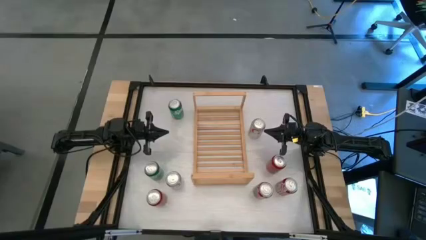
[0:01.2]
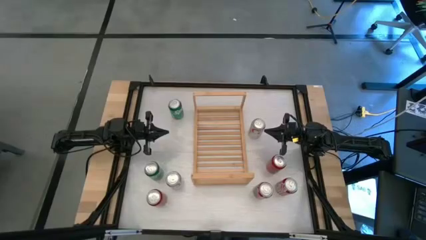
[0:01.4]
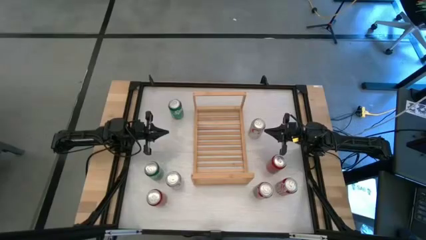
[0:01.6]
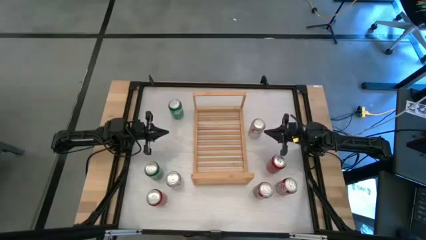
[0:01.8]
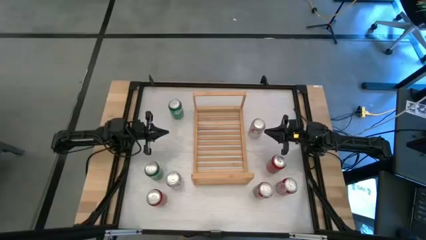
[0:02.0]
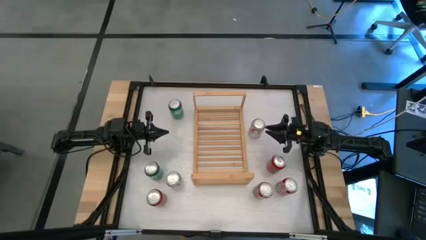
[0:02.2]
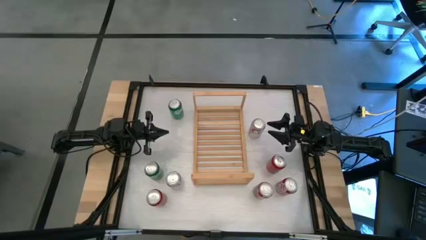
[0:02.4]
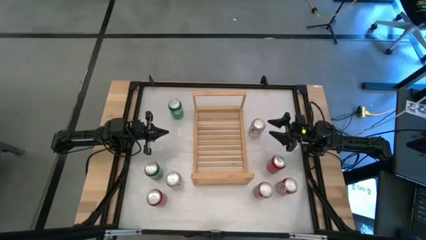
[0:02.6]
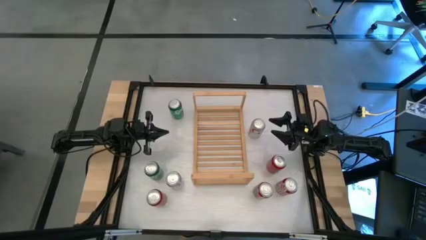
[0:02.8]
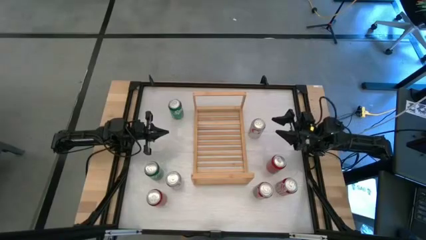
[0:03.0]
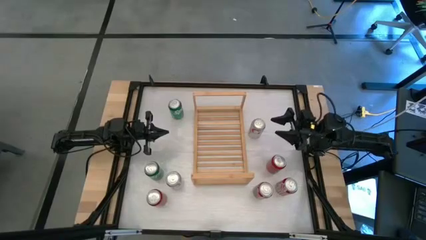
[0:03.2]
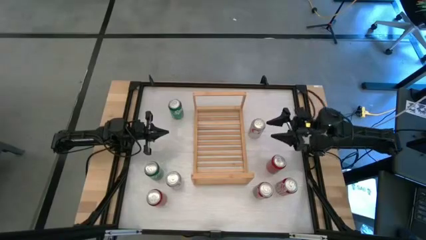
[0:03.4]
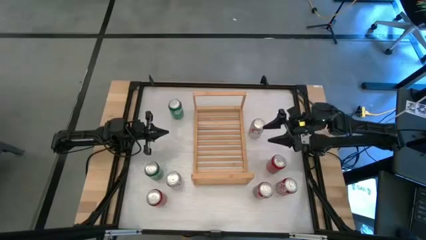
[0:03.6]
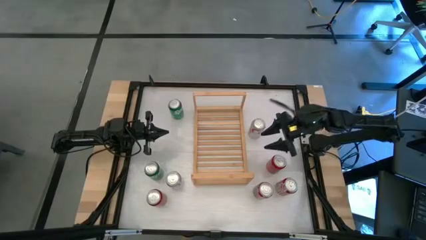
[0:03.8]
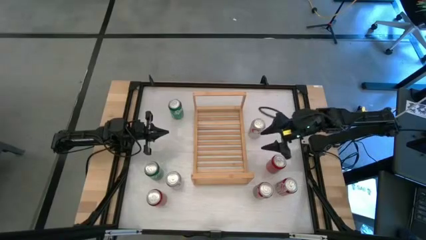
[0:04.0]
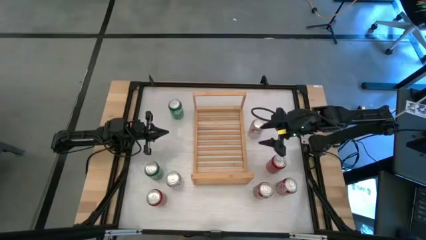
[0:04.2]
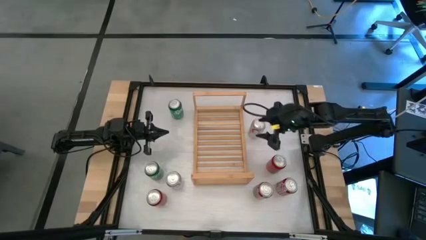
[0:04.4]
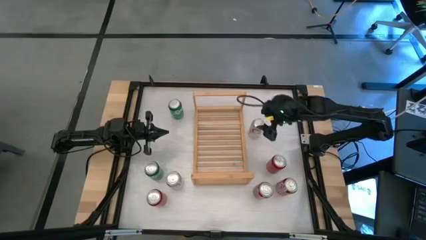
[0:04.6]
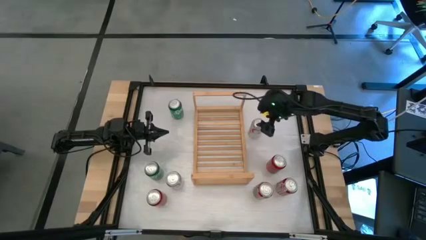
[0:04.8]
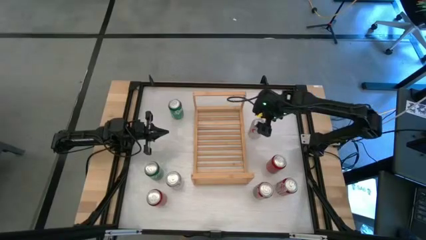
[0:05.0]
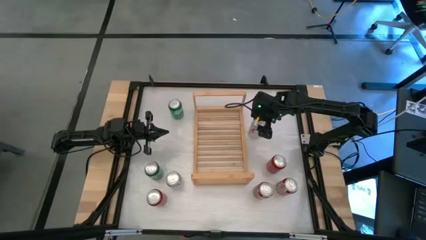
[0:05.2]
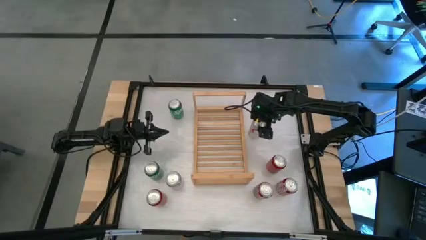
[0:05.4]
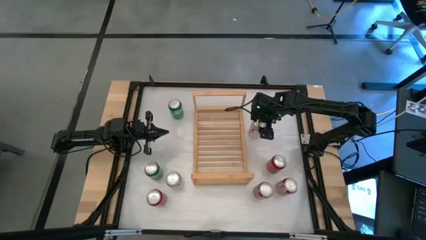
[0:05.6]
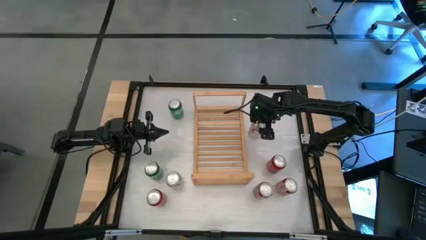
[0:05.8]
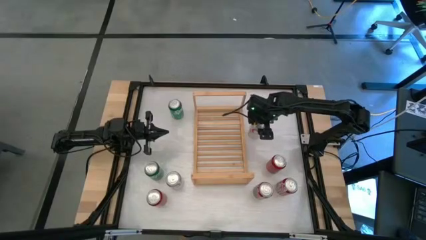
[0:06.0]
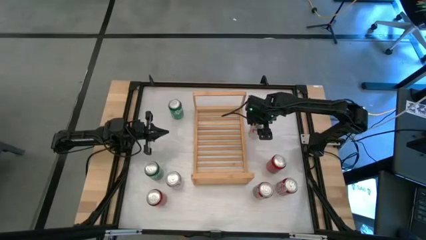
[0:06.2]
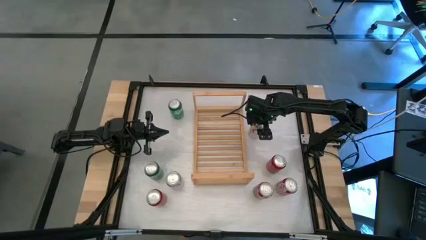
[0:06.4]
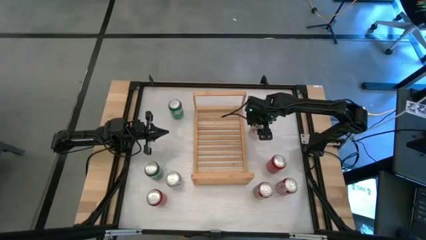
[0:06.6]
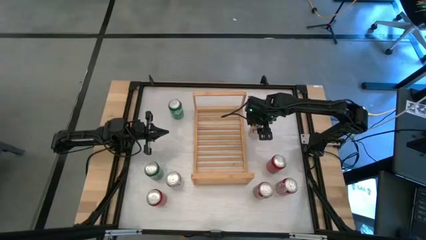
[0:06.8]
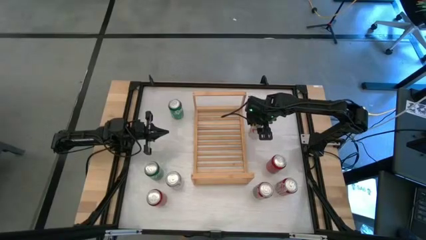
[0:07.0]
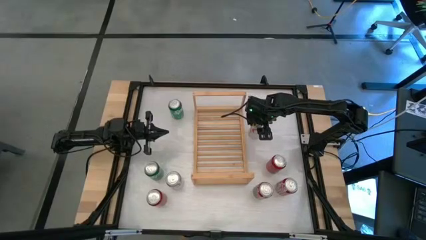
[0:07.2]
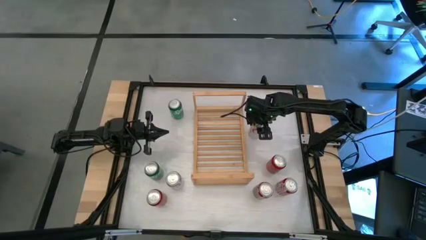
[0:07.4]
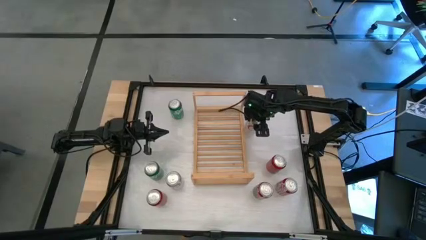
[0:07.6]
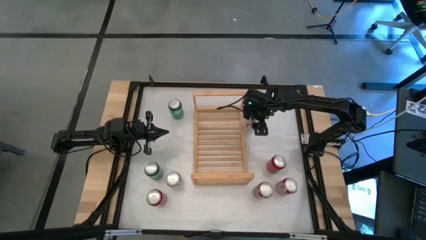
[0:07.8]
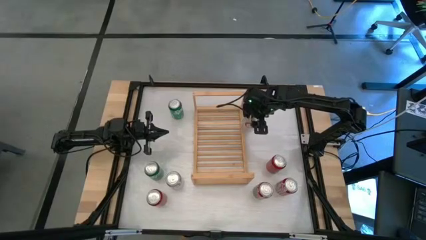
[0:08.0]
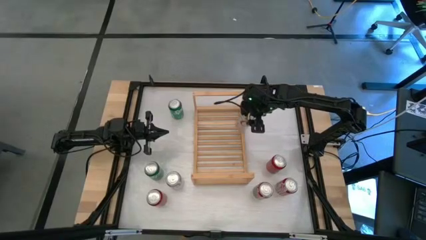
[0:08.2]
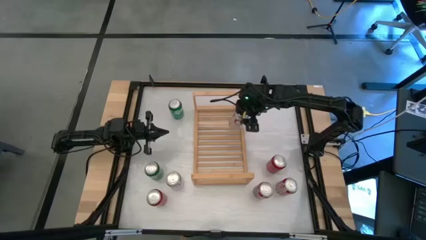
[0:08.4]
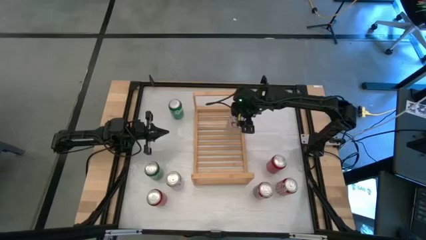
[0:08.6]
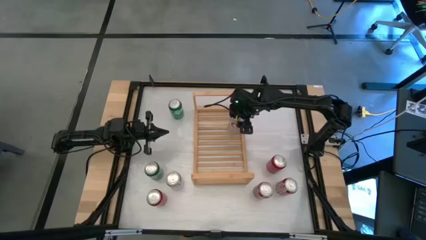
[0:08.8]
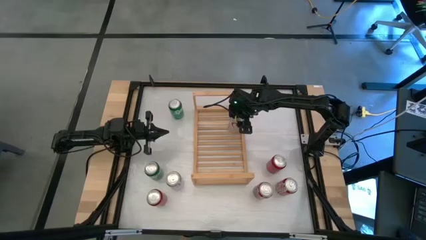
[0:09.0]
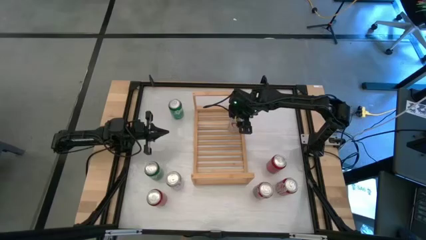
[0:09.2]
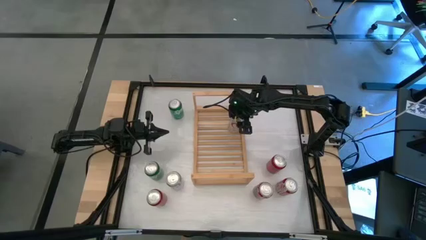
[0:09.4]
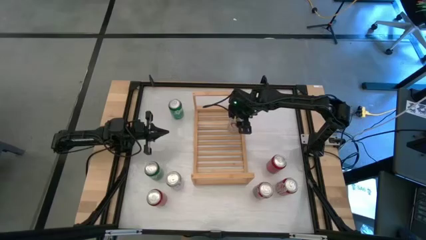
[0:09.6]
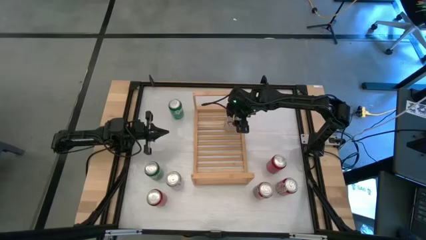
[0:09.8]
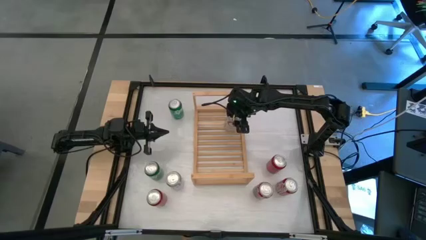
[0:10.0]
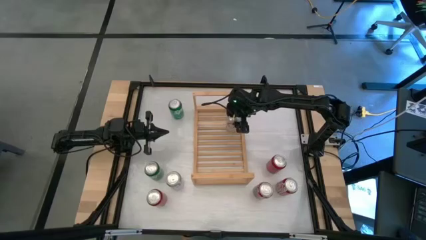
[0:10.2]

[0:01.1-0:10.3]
Task: Place canned beverage on shelf
Put the top silver soda can on the shelf

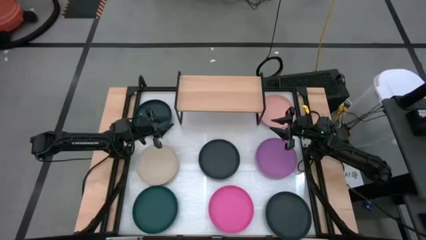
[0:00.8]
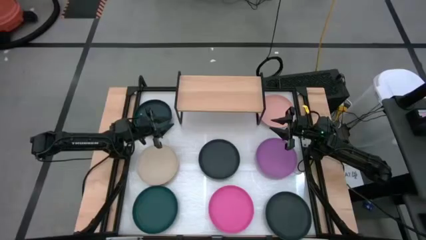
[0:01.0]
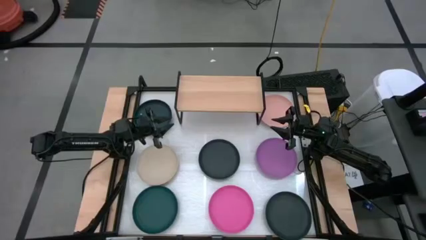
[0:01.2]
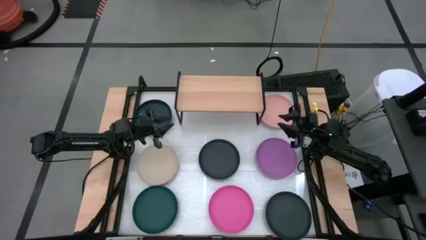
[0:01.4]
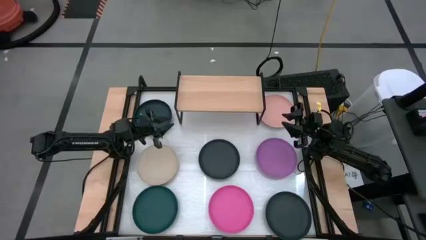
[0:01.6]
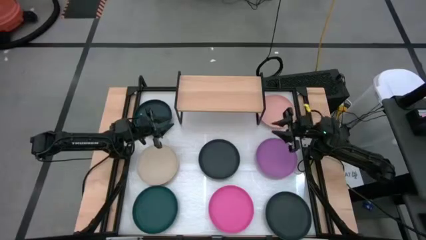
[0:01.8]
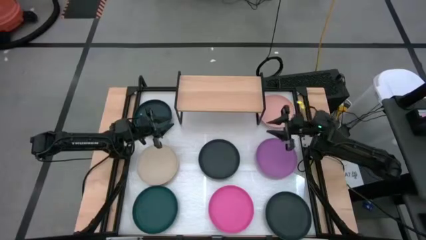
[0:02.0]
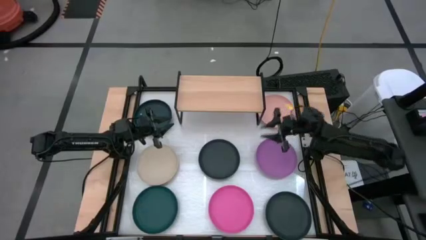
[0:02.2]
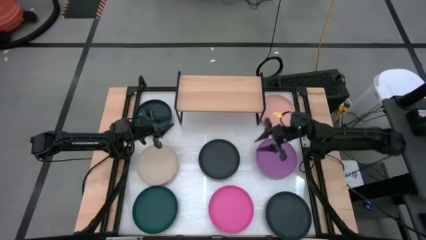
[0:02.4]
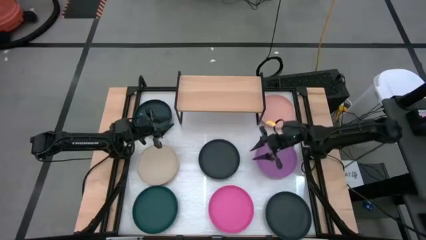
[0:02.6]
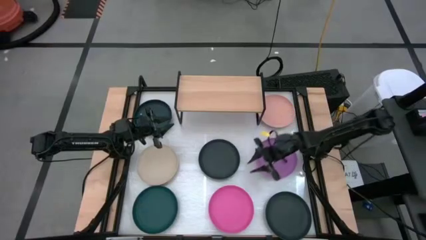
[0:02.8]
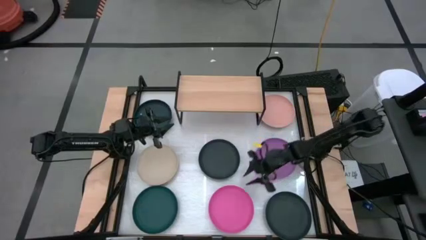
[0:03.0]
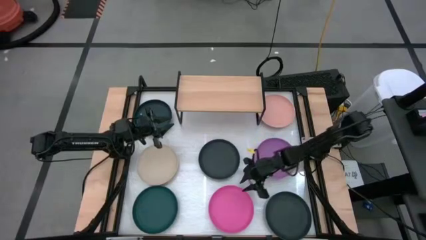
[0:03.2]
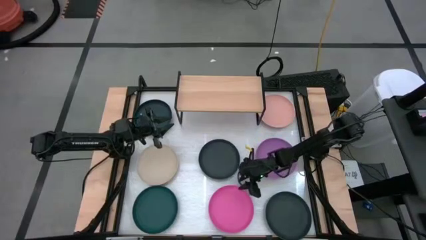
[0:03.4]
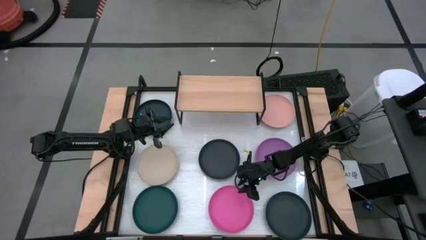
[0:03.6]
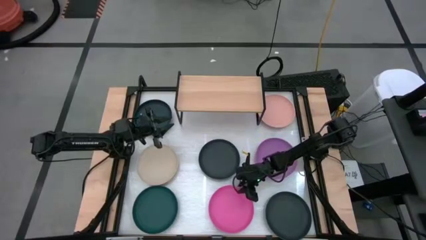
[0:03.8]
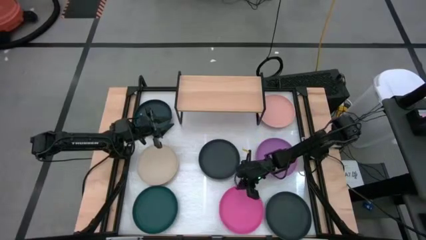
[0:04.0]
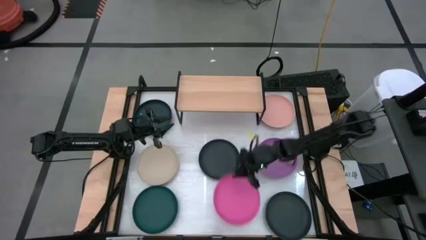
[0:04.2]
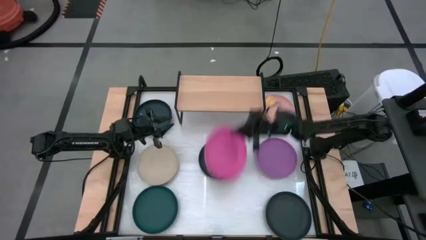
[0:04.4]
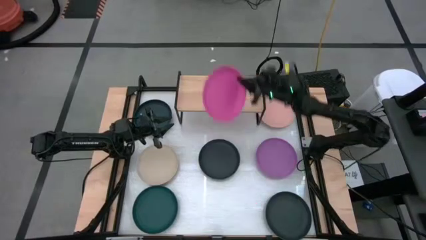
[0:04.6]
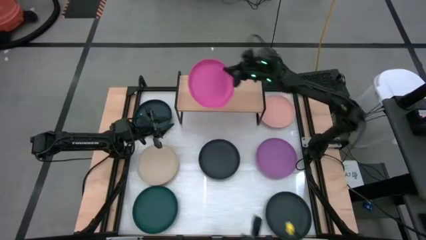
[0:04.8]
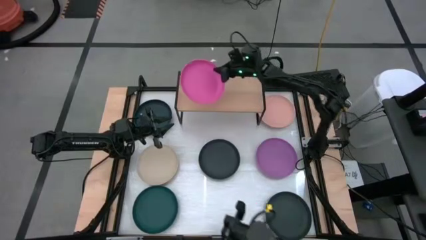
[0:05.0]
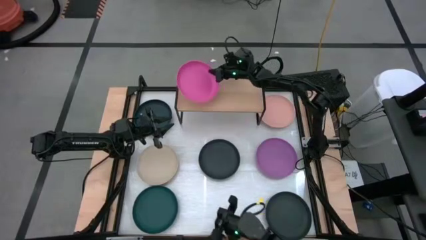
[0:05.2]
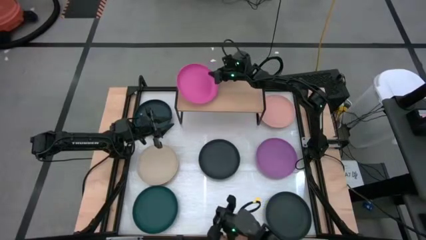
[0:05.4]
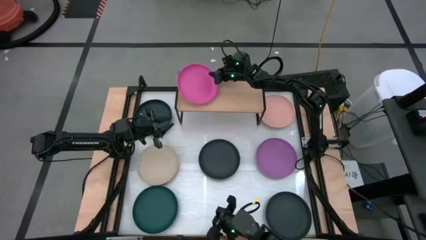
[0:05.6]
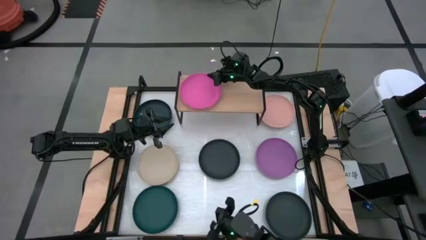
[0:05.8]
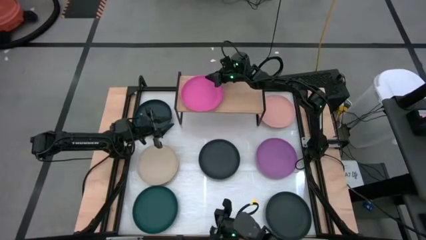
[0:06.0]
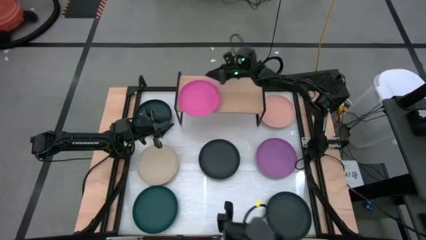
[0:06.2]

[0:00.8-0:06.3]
Task: Place and stack plates onto a shelf
Put the pink plate on the shelf
